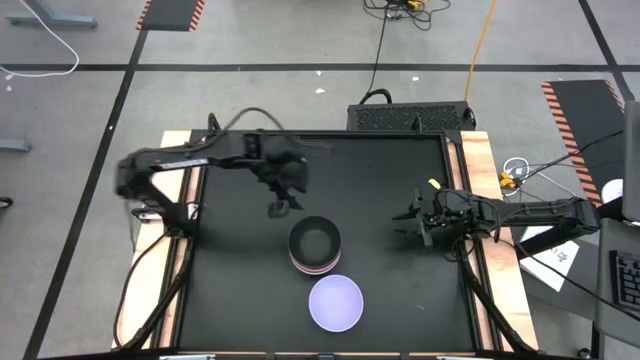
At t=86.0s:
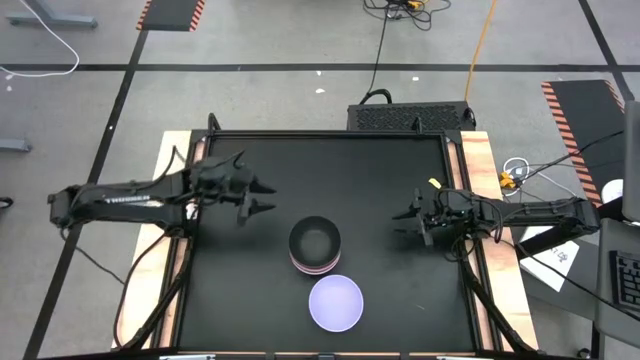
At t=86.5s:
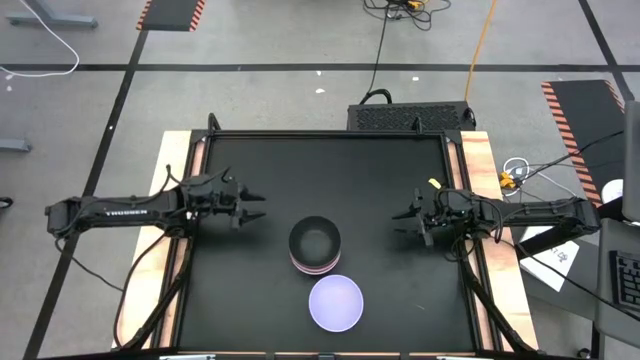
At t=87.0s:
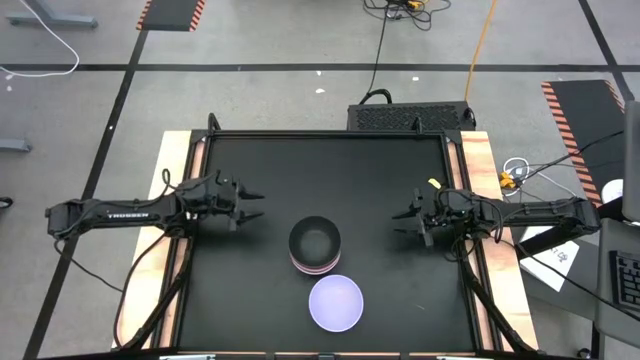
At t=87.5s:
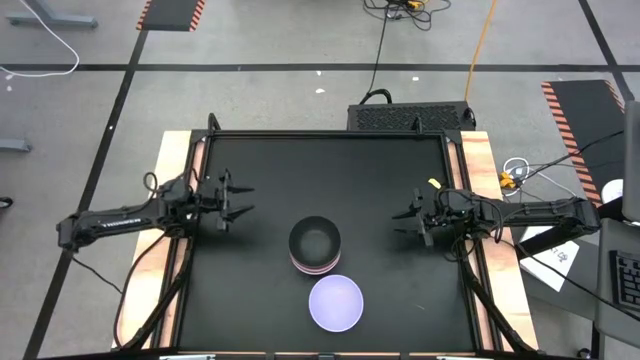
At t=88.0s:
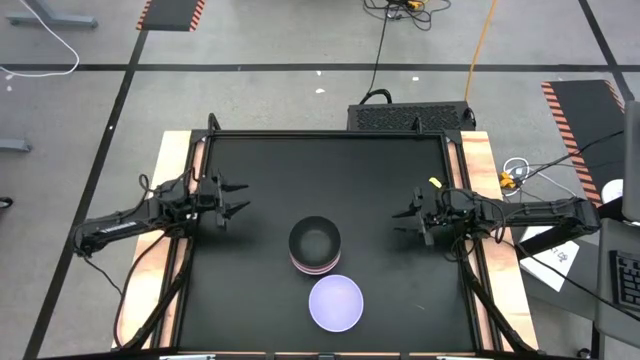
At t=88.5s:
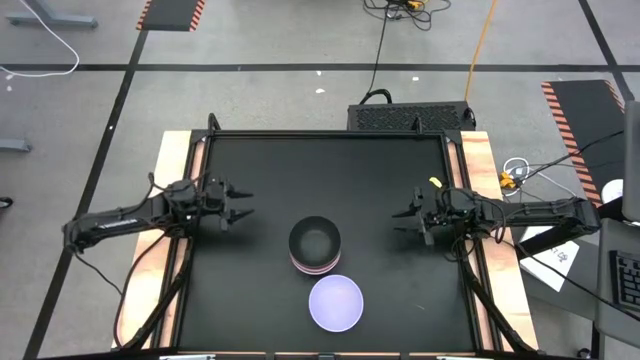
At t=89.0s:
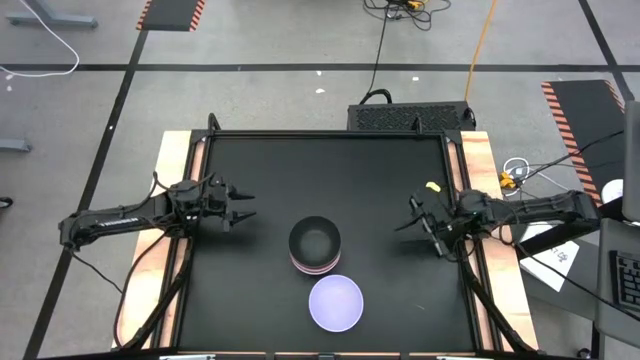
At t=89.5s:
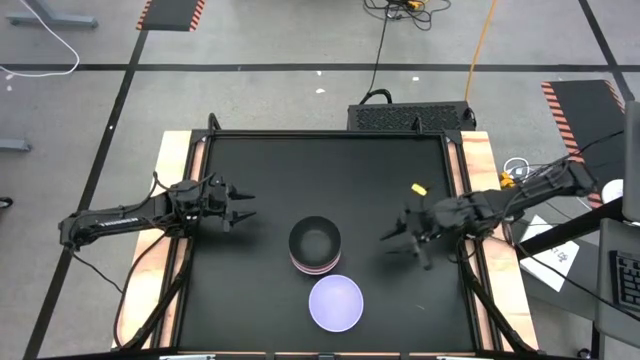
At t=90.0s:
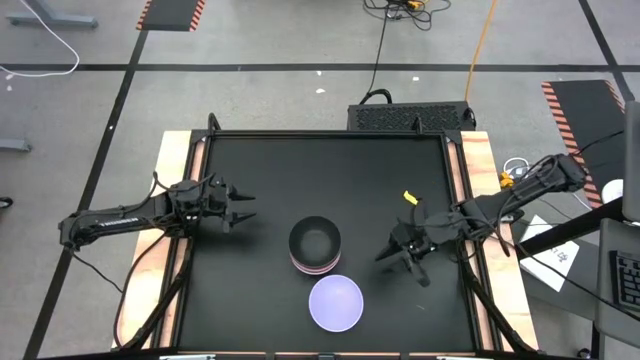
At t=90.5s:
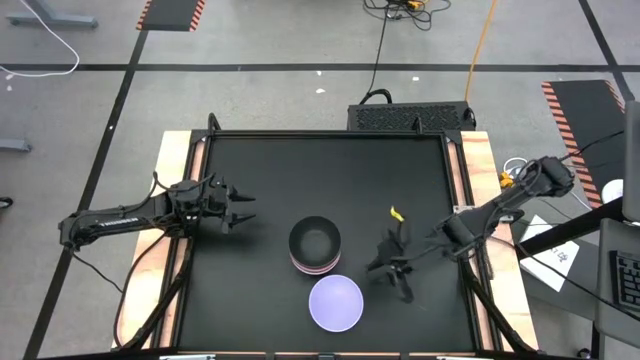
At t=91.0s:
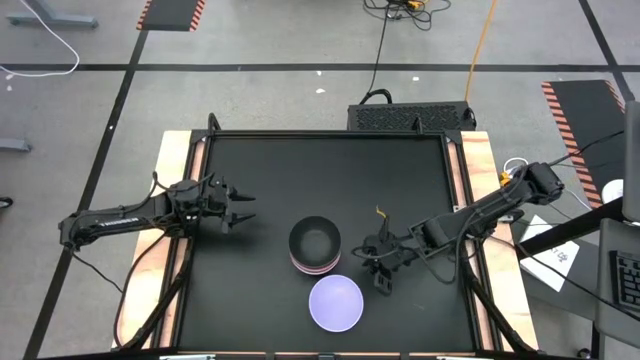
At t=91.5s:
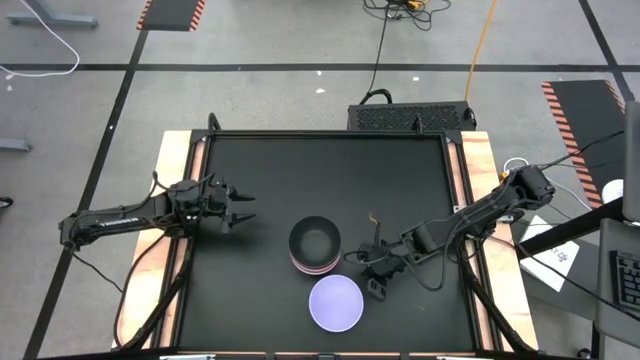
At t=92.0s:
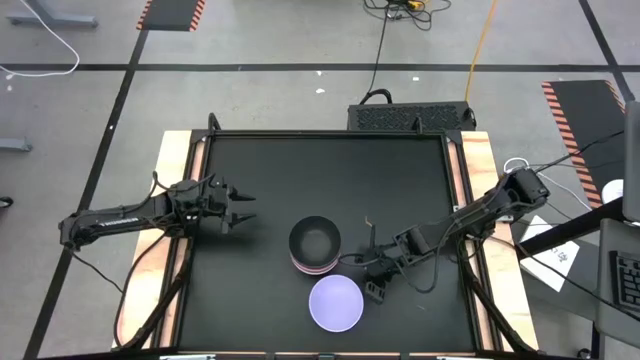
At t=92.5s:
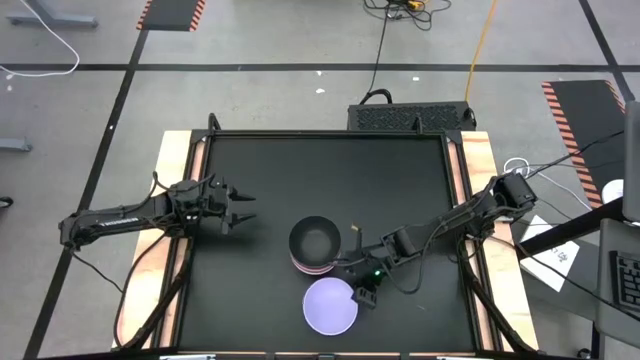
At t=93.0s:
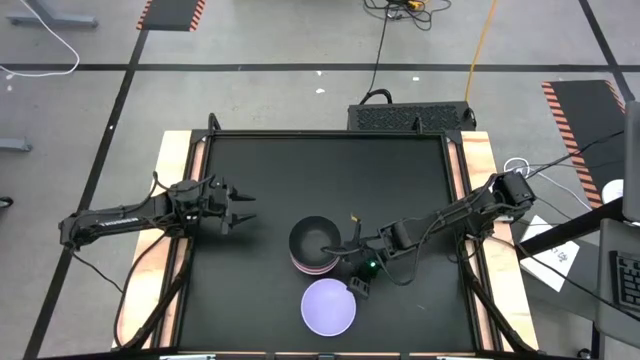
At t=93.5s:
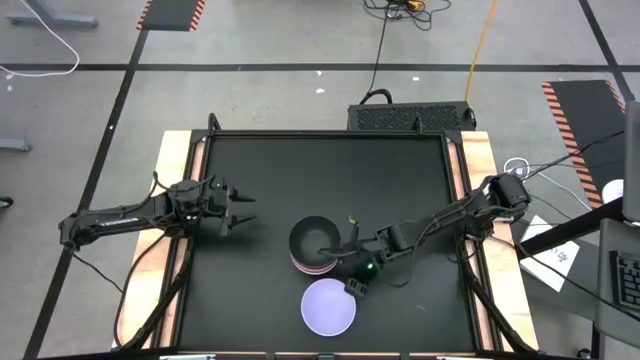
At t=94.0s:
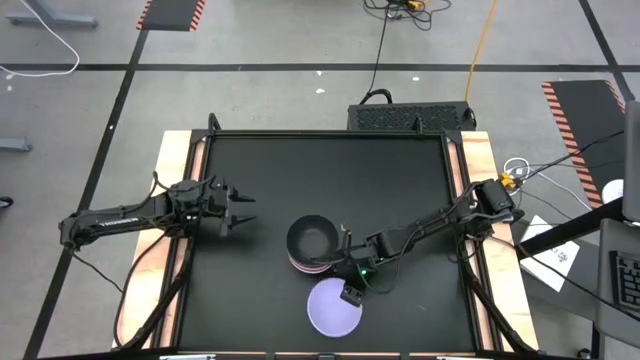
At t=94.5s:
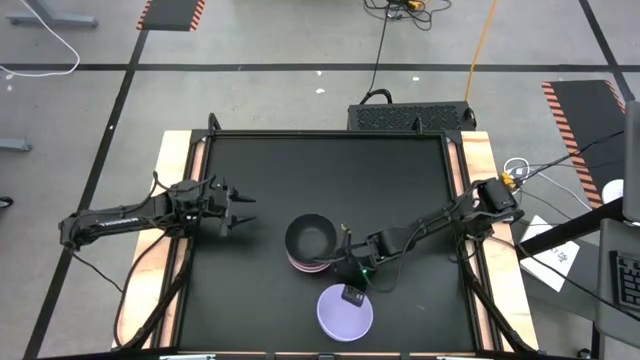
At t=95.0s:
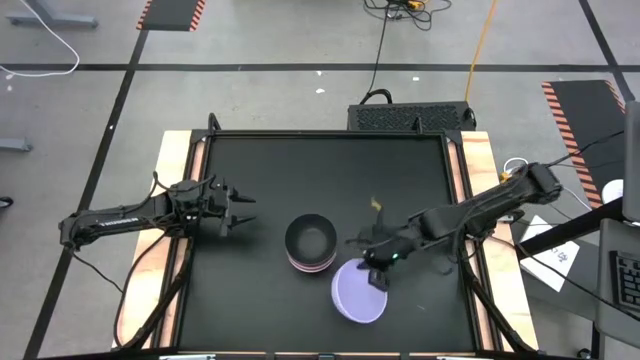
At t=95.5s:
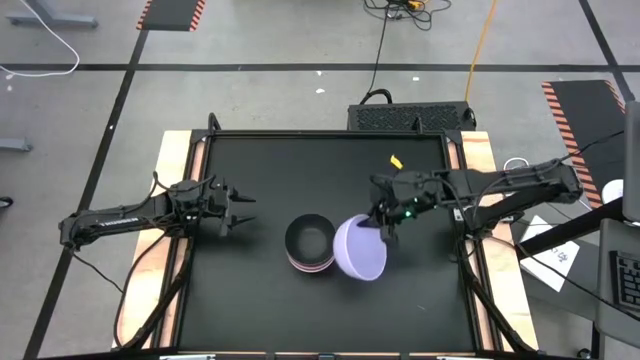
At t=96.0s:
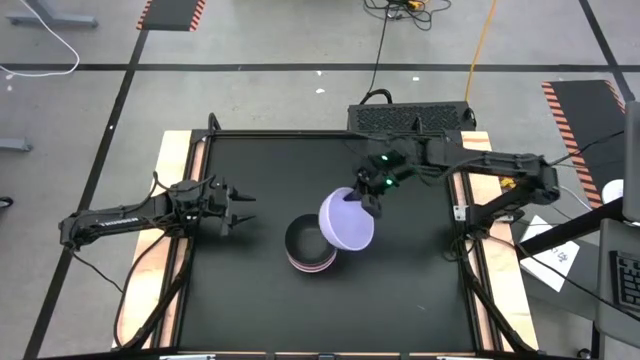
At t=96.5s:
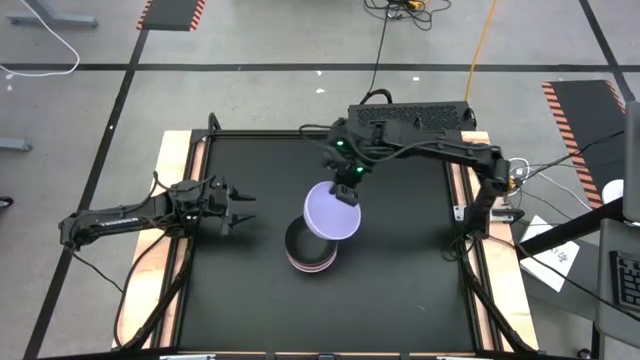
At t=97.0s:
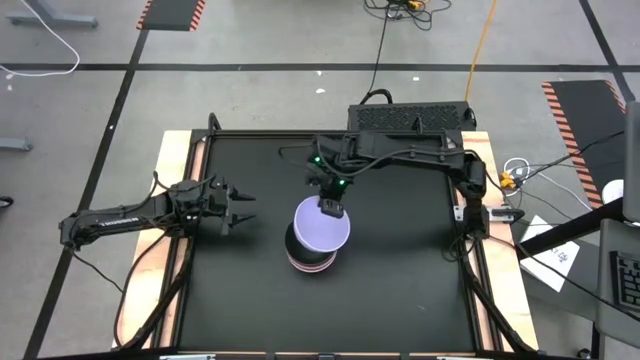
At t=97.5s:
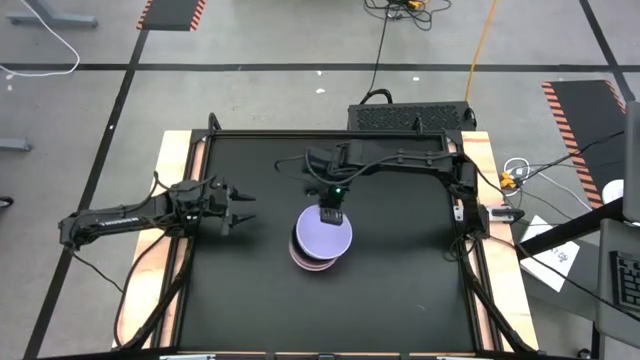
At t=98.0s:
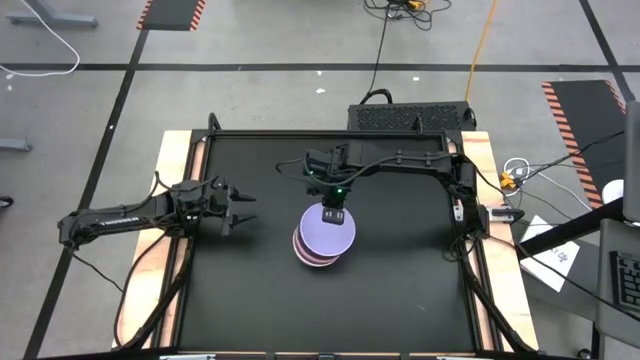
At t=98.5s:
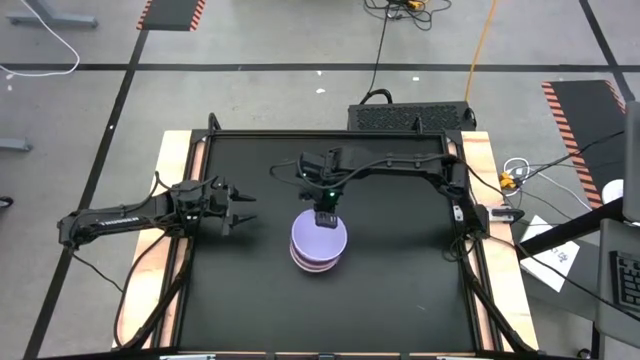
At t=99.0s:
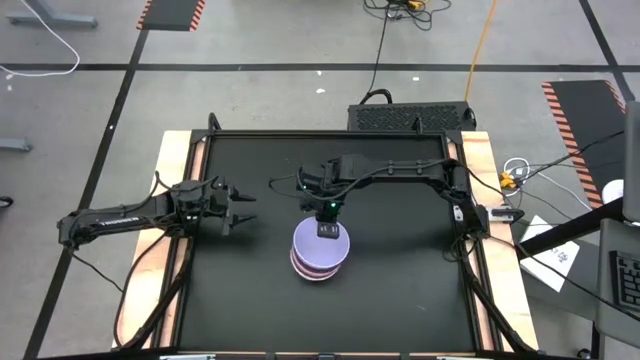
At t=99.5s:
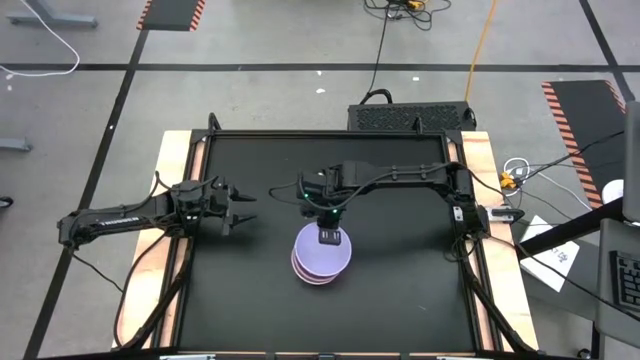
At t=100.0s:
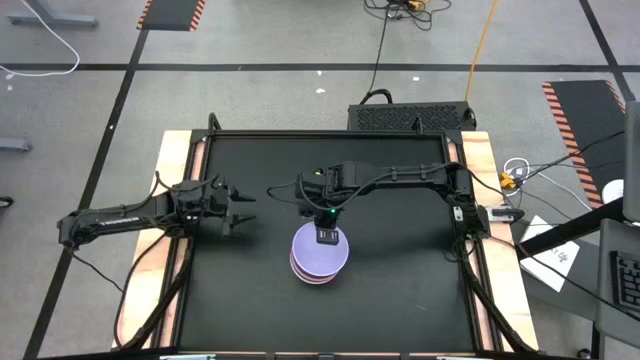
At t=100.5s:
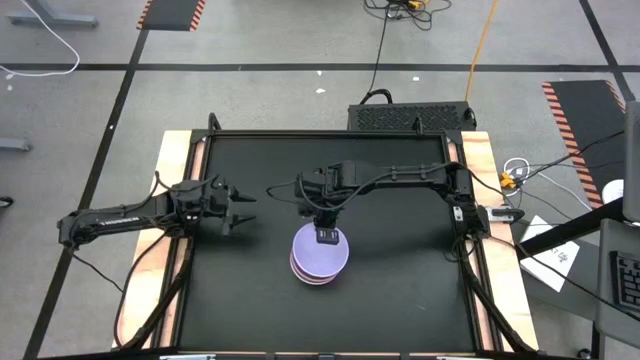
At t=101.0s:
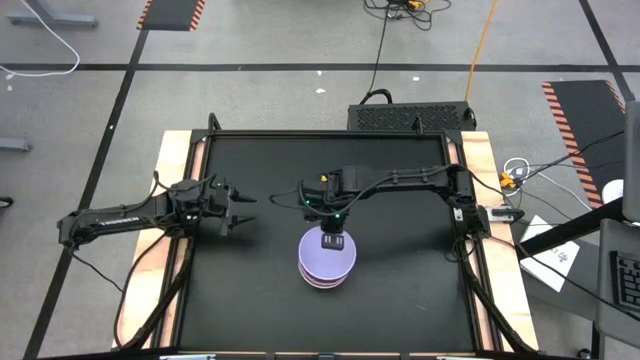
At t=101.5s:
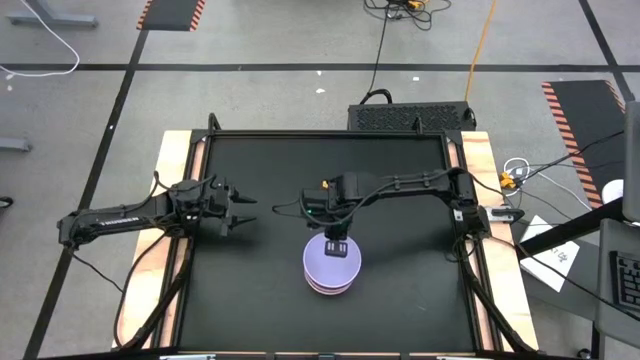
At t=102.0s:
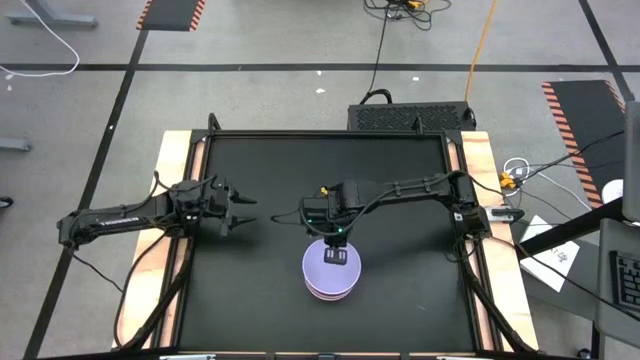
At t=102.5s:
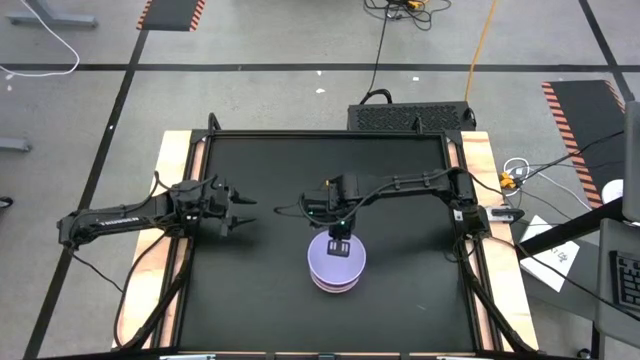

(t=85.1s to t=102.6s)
Task: Nest bowls inside each other
Stack the purple bowl on top of the black bowl

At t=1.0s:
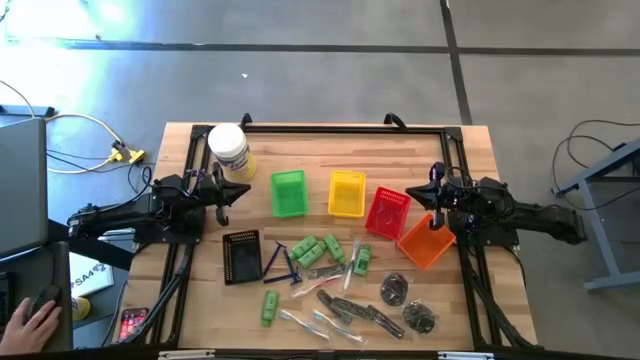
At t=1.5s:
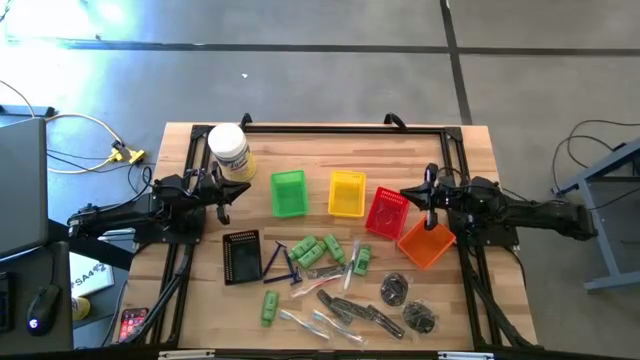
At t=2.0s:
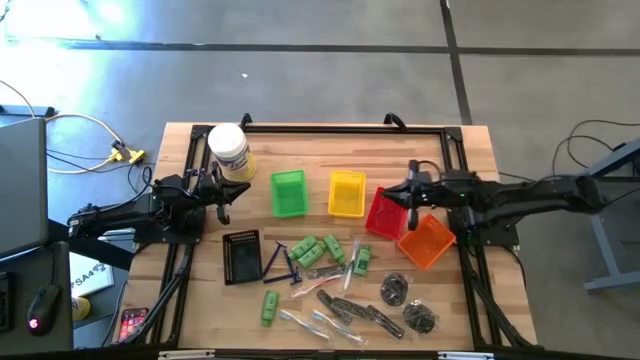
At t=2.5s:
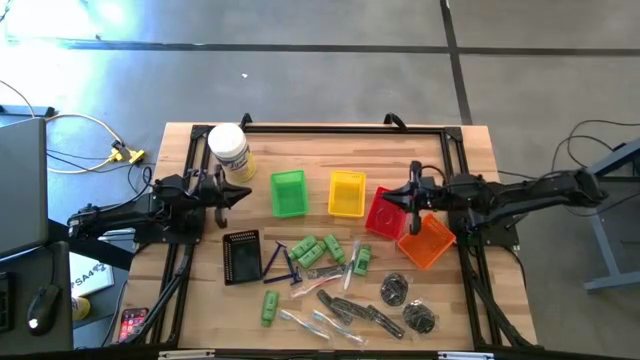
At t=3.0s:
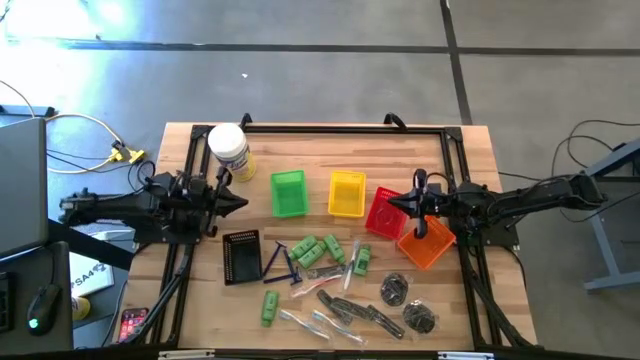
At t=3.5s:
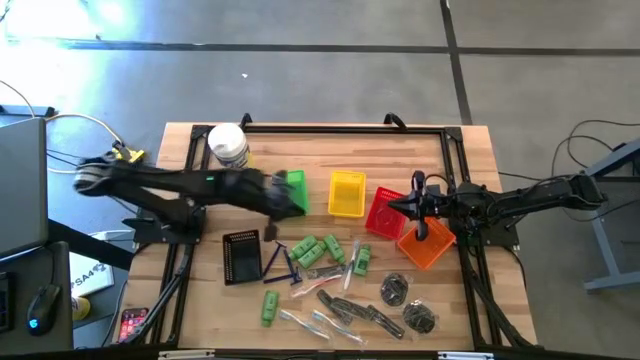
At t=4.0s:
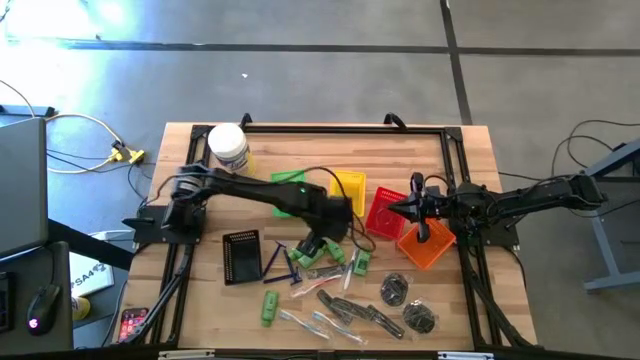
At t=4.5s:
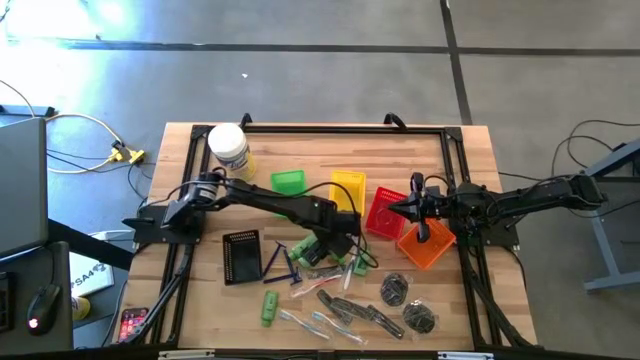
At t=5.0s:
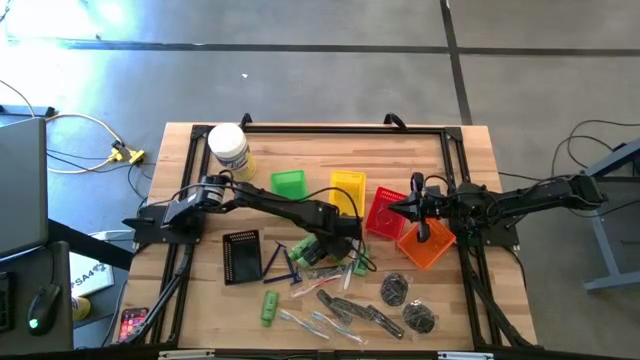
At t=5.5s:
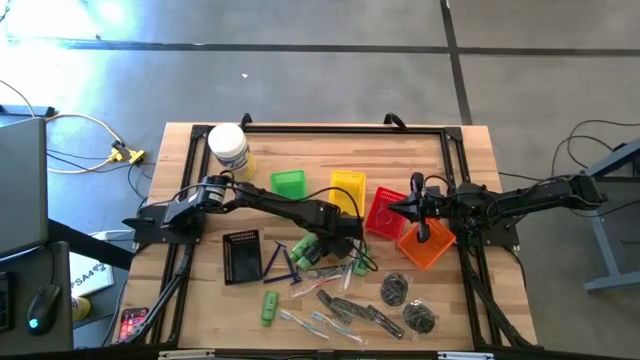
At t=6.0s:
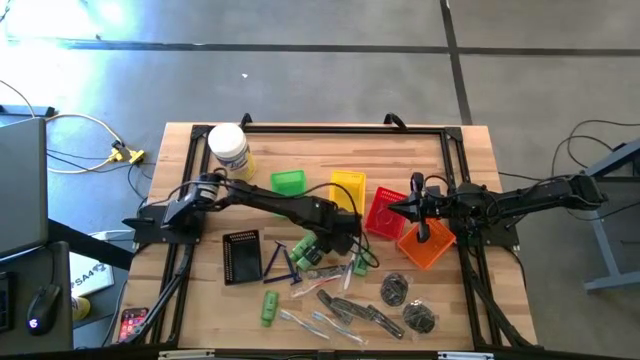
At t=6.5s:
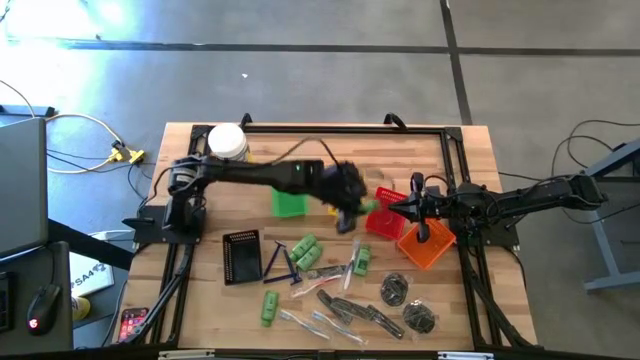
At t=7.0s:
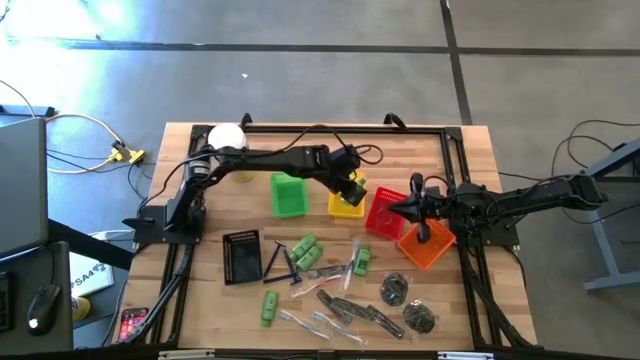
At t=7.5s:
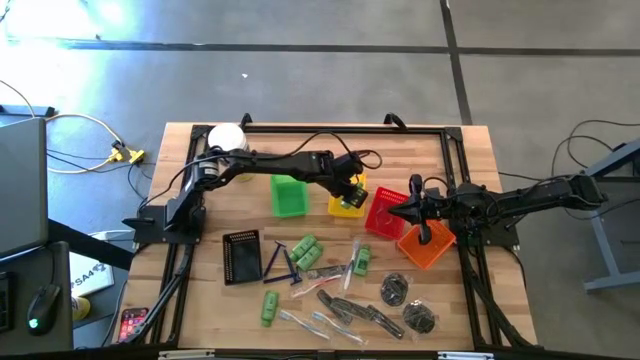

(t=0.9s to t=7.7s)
Task: Pick & Place Travel size toiletries
Put the green shampoo into the yellow bin
